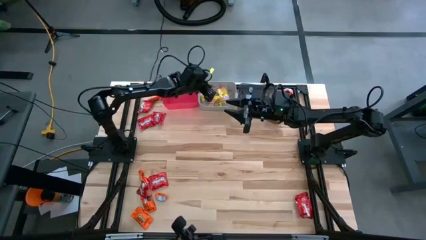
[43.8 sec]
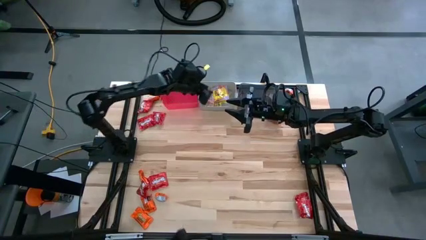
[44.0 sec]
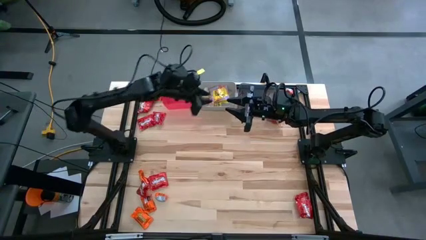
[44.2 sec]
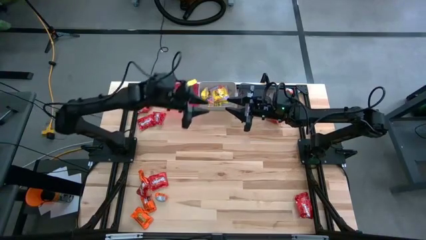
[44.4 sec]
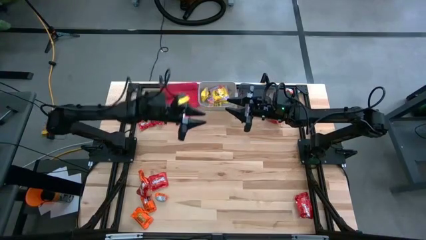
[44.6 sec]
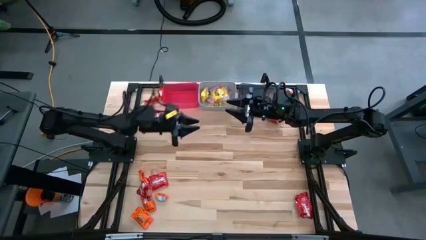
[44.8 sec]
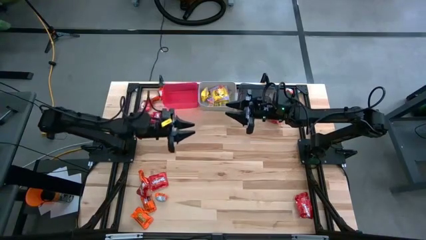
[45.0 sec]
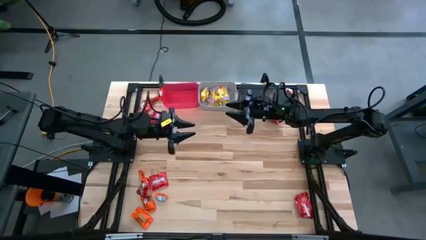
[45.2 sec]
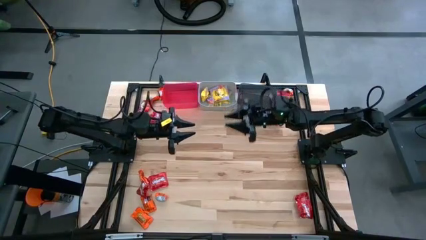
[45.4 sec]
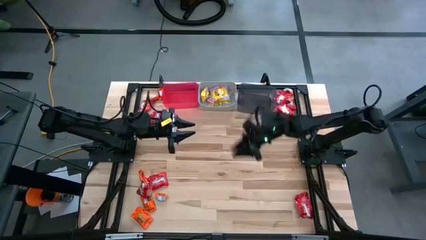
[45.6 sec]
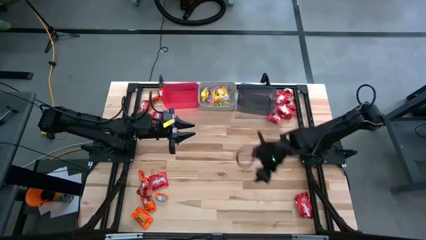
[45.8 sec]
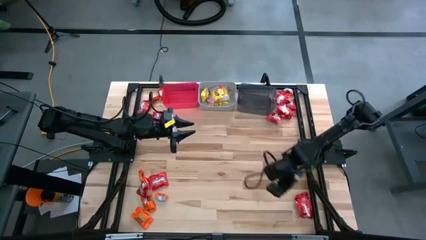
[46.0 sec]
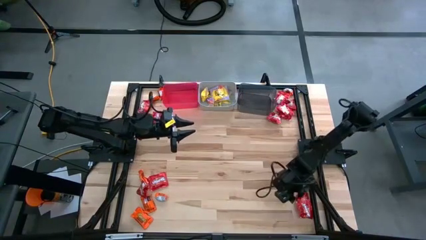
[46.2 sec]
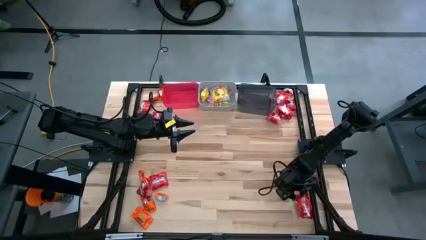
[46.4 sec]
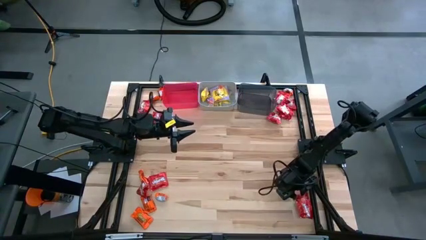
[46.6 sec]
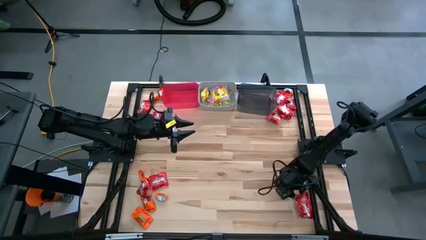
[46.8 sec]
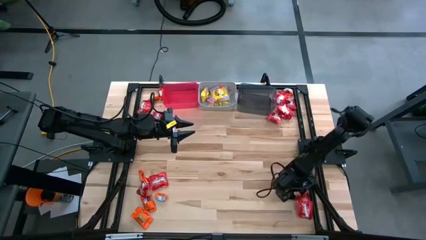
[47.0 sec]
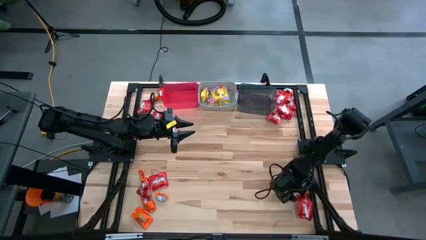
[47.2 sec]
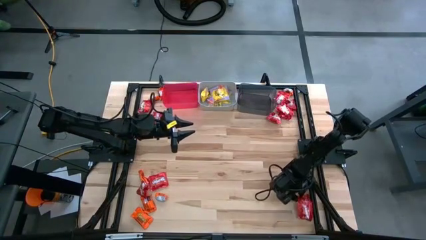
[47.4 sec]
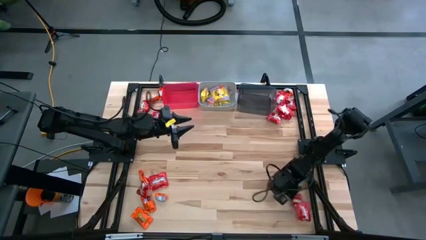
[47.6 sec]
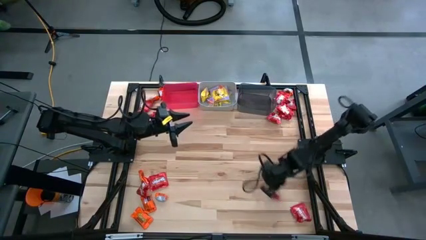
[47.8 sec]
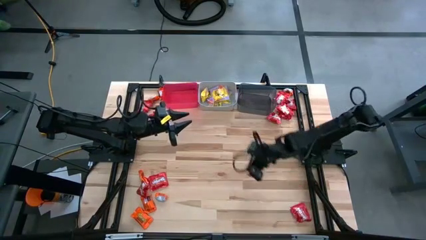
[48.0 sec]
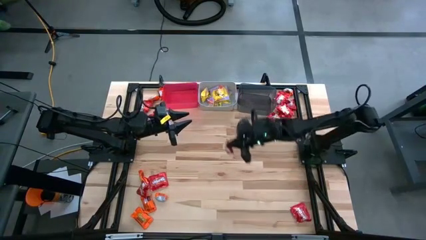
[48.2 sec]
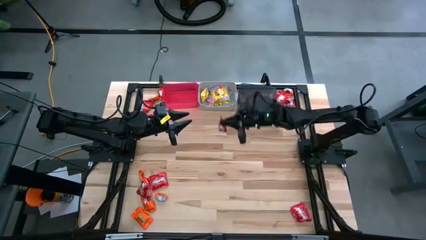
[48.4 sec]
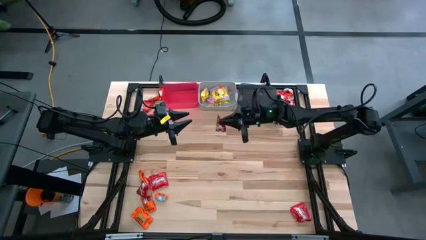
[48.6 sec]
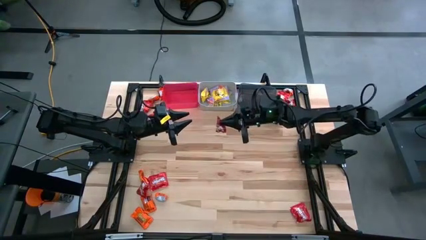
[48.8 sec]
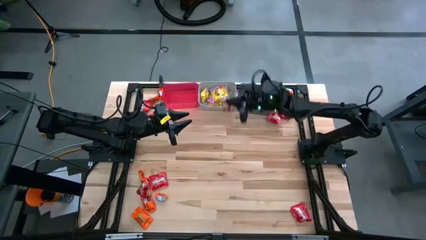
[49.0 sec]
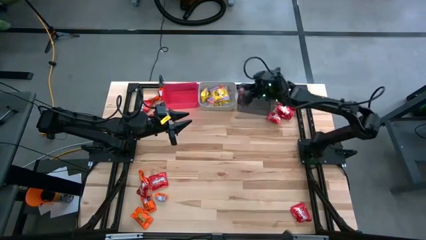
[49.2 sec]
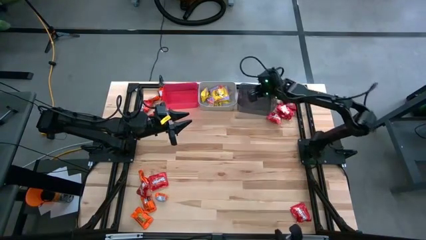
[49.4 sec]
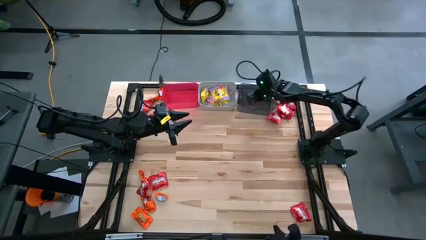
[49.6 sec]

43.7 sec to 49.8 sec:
Task: Sort candy
Put the red candy into the black bin

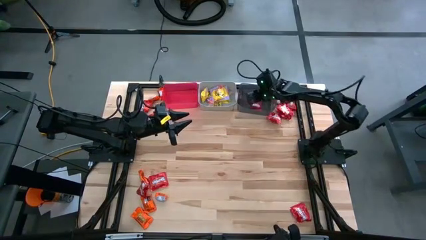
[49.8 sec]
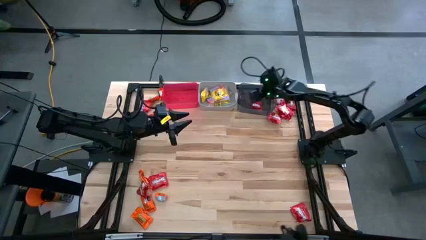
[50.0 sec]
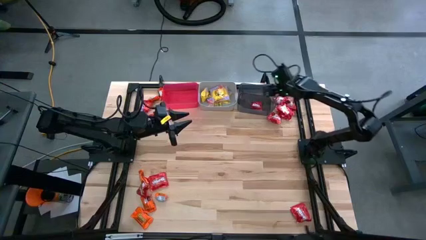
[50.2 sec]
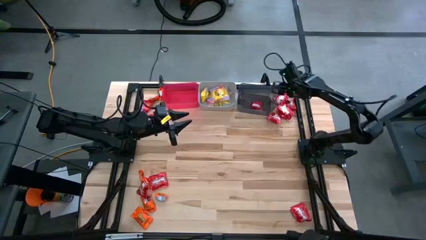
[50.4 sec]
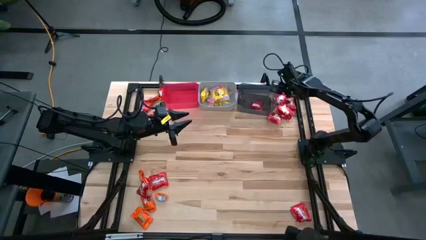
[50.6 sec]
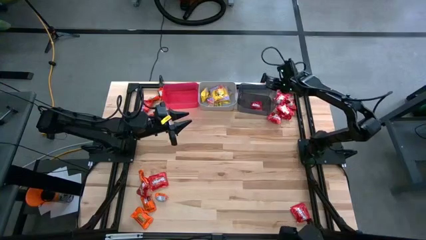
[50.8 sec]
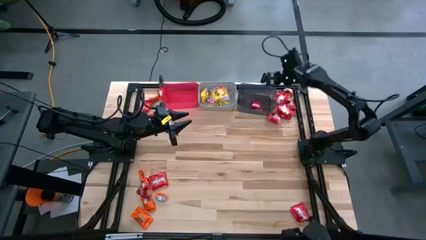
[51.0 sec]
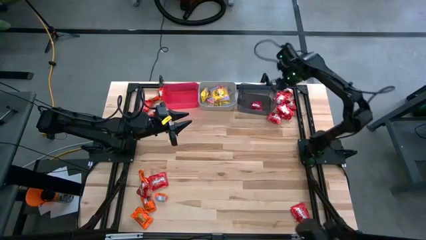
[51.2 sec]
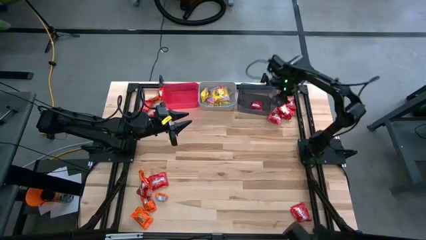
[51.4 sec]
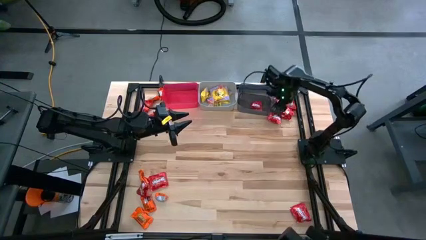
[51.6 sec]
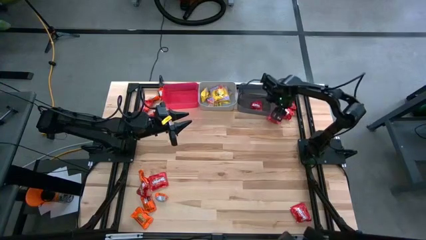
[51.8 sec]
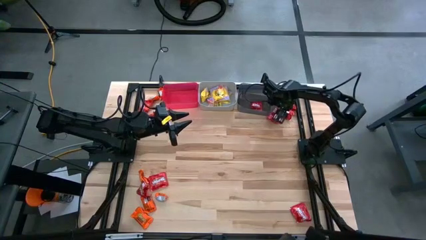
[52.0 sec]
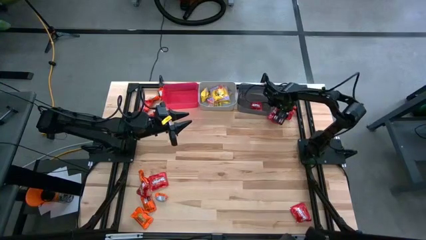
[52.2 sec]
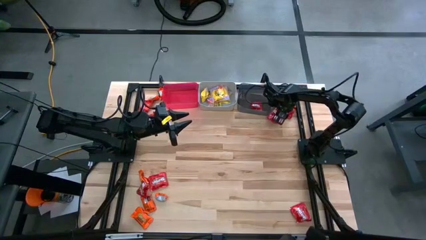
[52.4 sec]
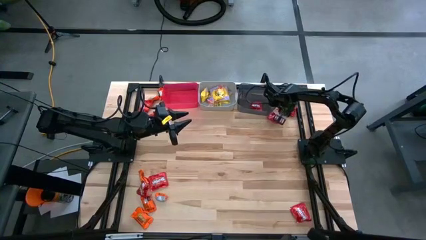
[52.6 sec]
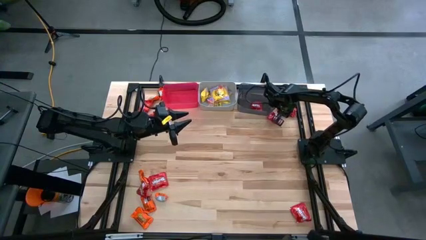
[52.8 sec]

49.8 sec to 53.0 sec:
Put the red candy into the black bin

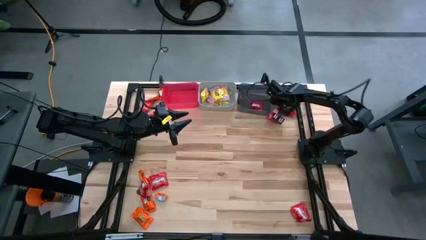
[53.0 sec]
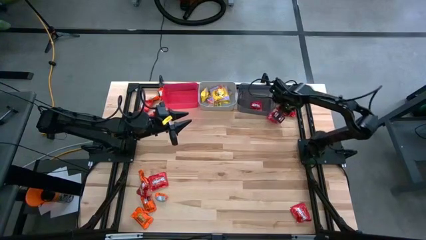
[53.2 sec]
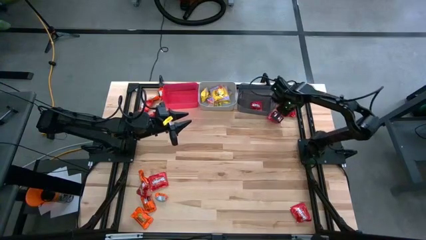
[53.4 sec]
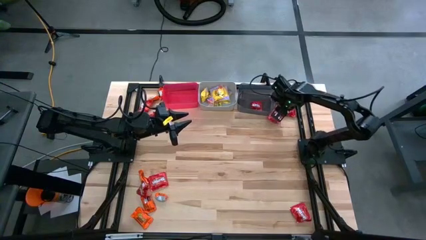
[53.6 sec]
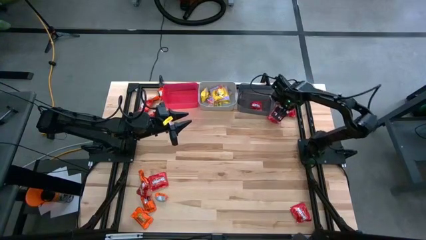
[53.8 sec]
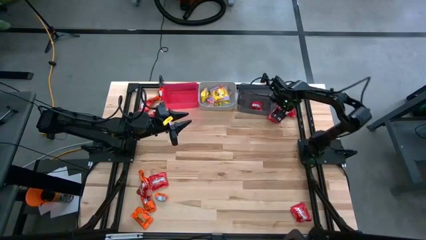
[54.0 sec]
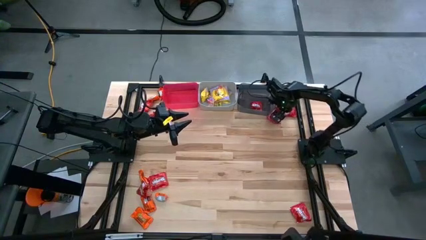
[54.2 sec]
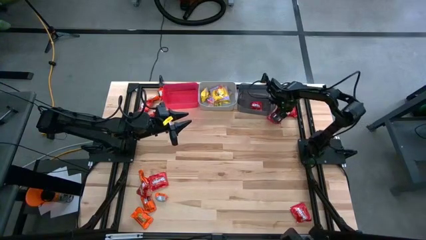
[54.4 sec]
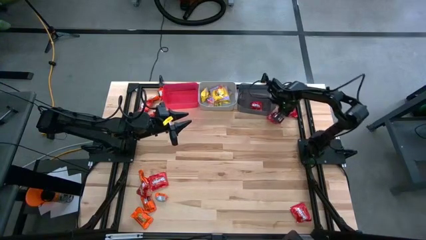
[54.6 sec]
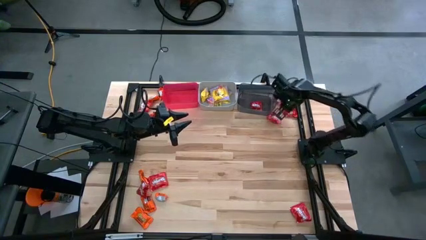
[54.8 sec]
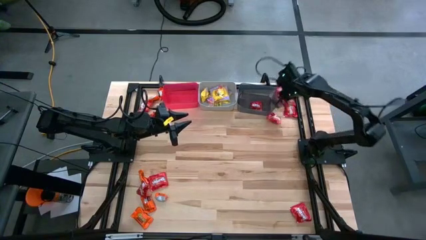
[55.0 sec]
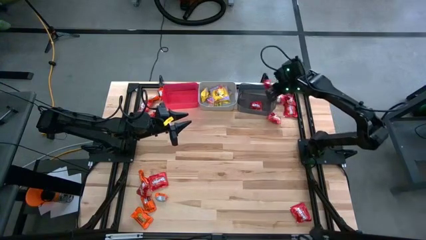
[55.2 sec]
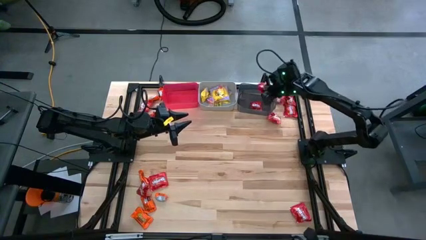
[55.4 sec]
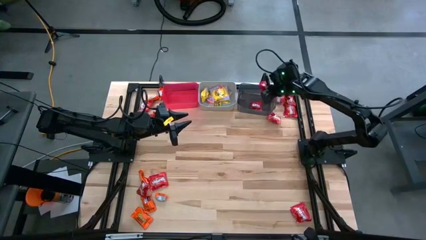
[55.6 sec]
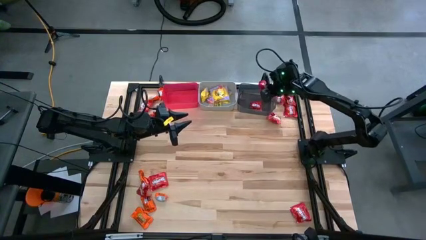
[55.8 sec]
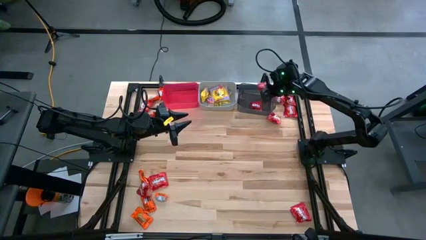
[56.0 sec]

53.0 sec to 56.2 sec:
Put the red candy into the black bin

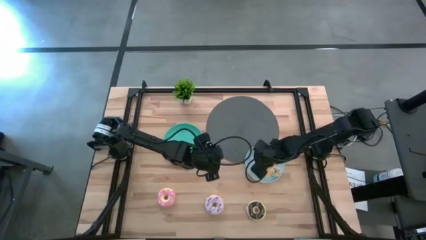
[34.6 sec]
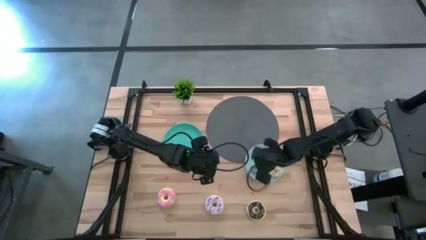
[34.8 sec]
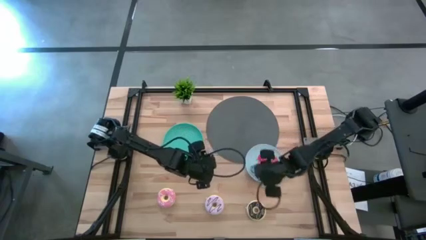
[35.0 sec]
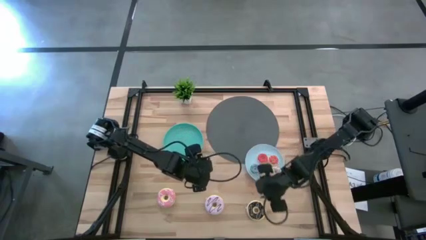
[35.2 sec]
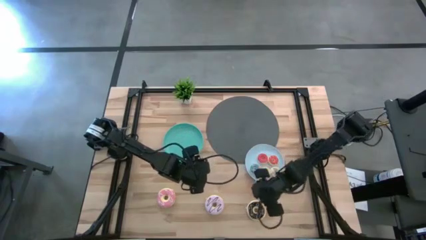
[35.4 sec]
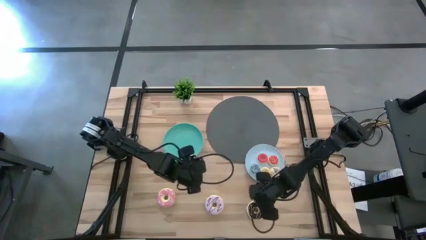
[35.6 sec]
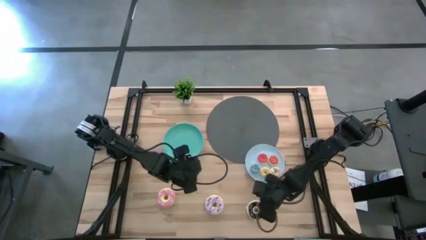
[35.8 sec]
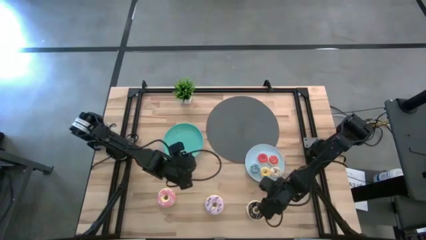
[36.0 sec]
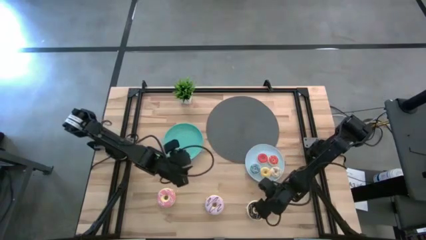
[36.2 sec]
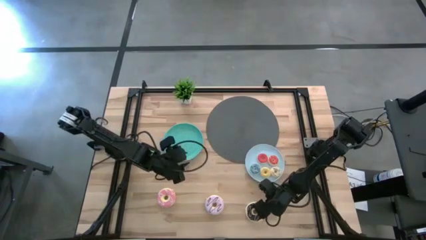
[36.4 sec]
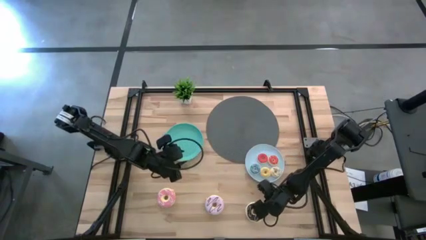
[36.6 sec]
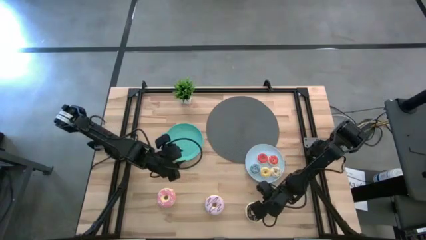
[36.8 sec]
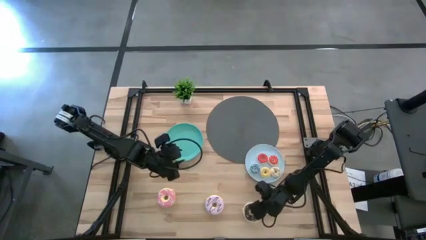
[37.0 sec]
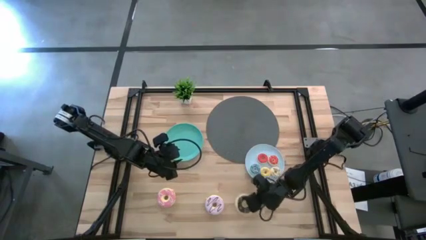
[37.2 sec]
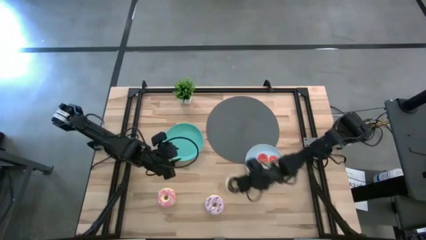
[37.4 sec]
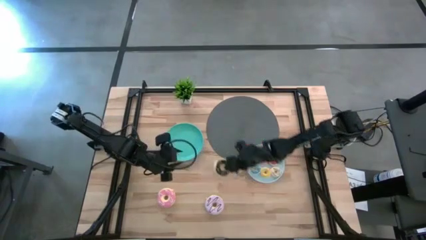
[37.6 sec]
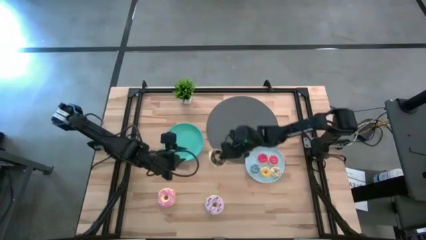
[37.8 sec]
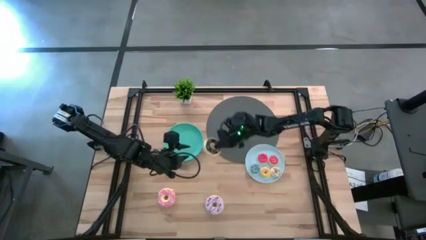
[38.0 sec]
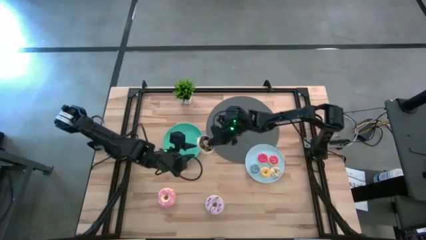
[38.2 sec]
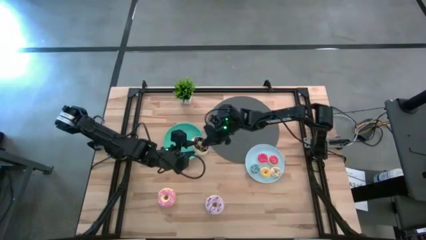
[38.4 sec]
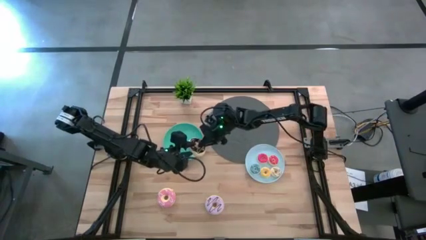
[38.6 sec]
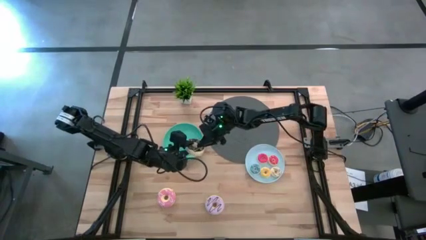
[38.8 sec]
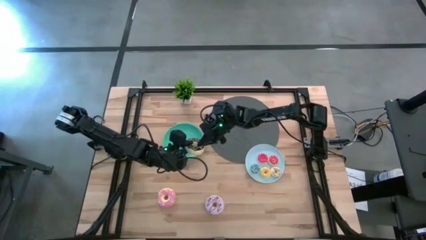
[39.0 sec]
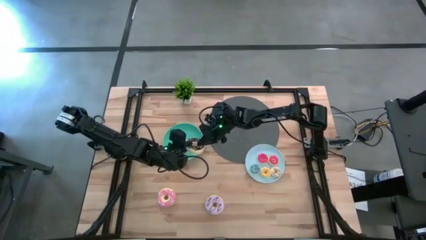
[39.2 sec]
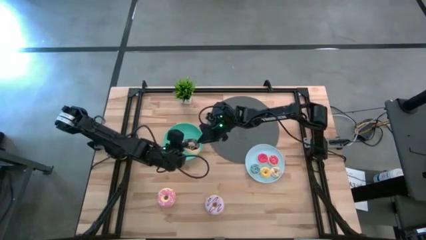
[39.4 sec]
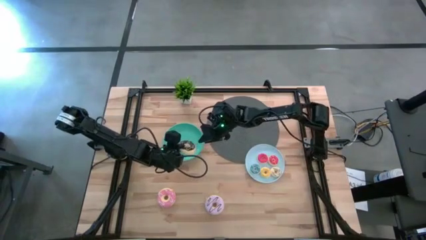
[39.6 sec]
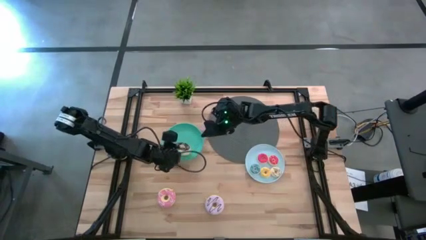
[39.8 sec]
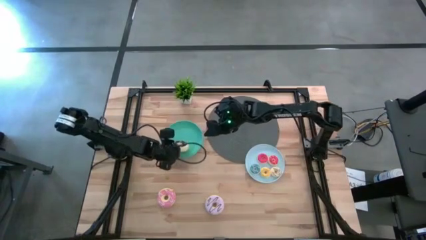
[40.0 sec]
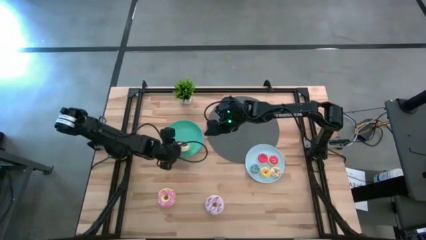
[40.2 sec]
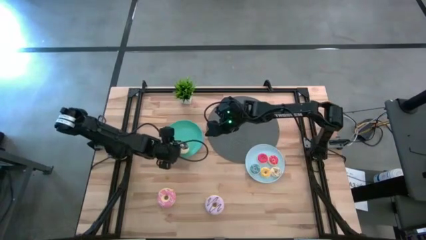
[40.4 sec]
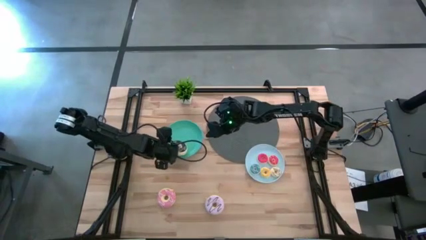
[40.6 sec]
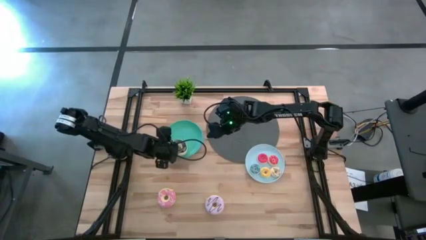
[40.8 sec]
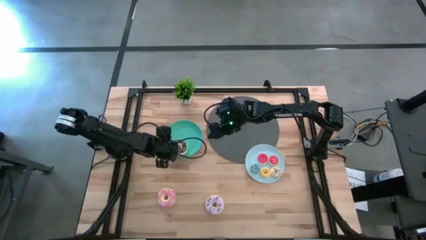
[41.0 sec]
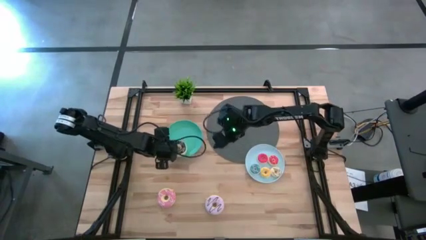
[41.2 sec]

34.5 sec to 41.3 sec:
Task: Pick & Place donuts
Put the big black donut on the blue plate
